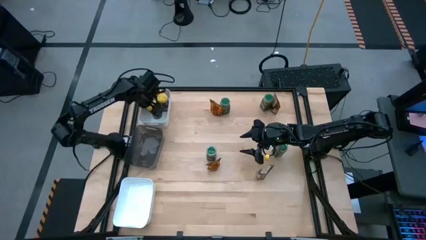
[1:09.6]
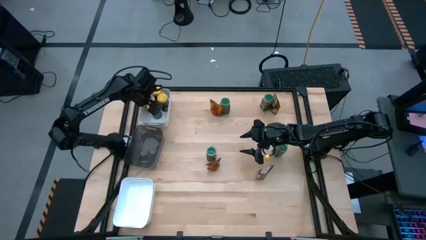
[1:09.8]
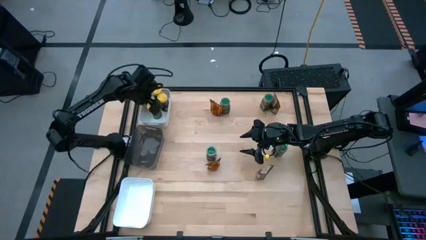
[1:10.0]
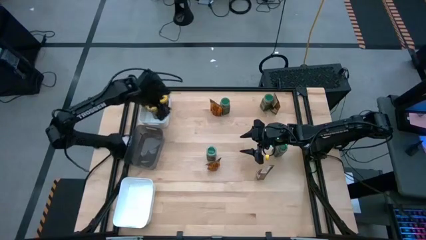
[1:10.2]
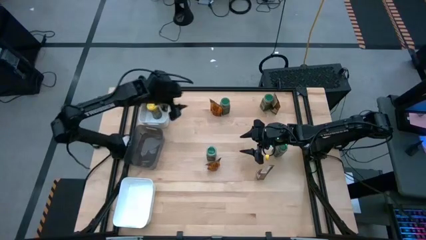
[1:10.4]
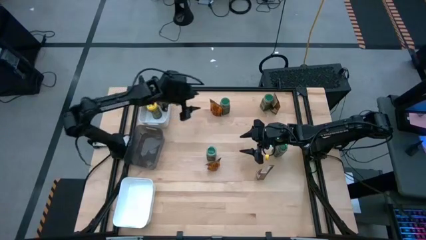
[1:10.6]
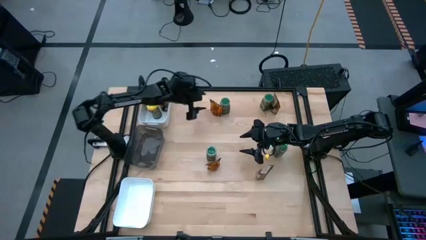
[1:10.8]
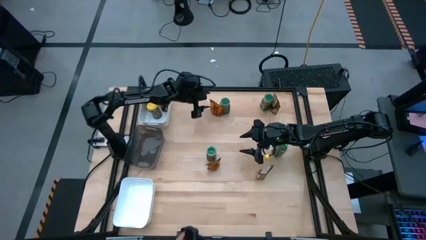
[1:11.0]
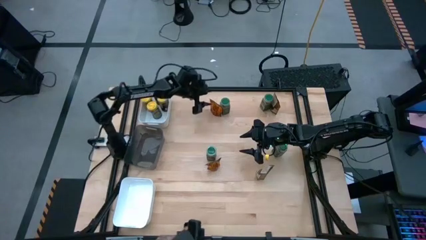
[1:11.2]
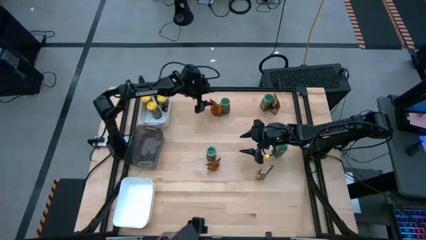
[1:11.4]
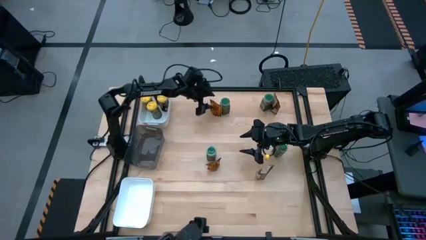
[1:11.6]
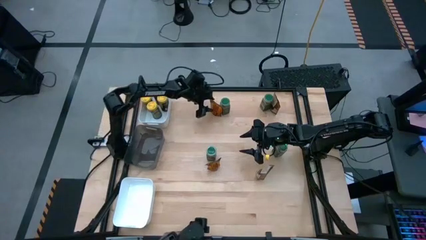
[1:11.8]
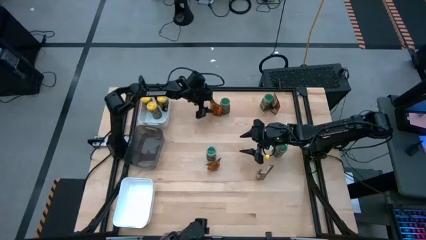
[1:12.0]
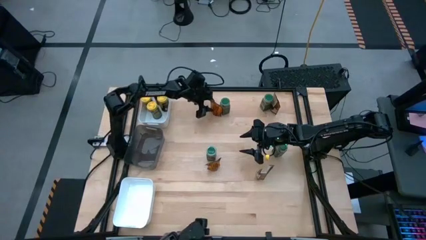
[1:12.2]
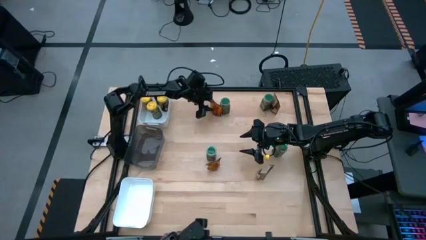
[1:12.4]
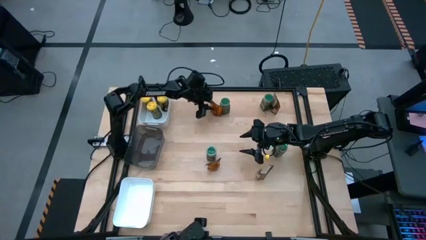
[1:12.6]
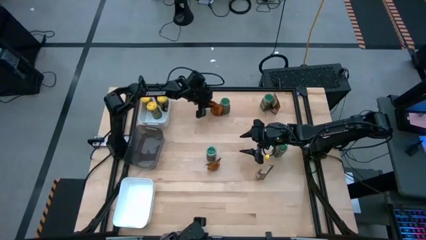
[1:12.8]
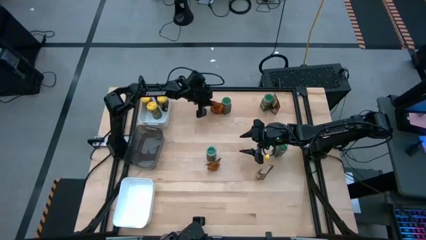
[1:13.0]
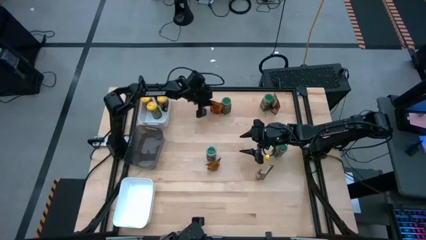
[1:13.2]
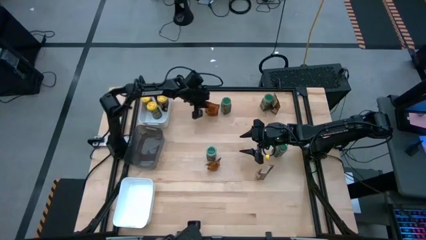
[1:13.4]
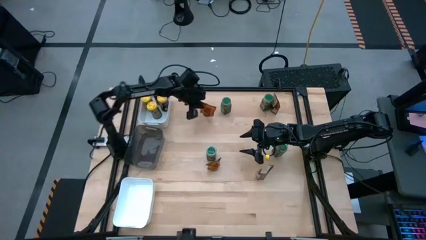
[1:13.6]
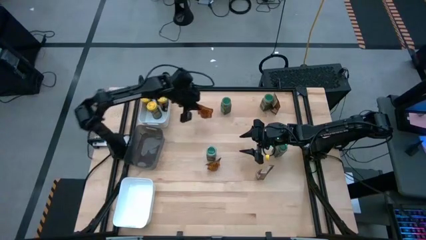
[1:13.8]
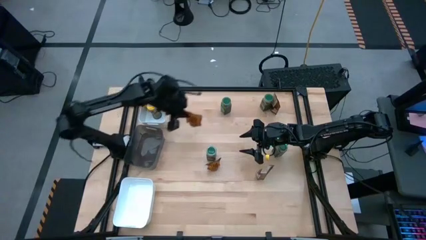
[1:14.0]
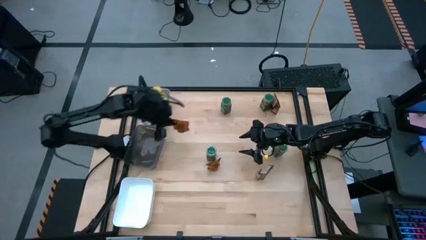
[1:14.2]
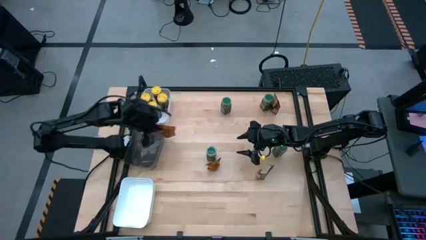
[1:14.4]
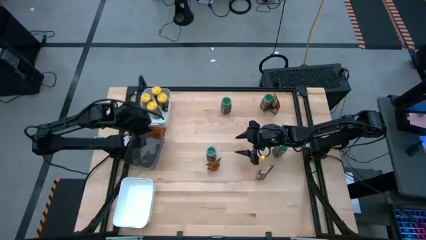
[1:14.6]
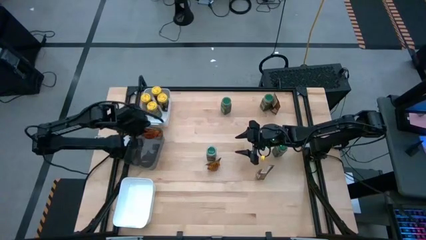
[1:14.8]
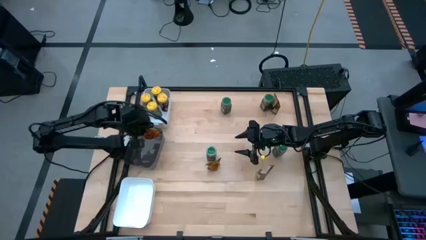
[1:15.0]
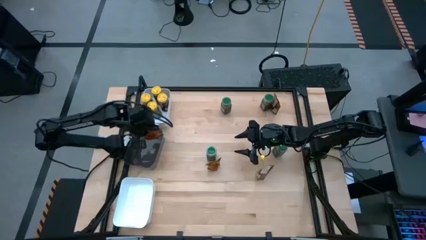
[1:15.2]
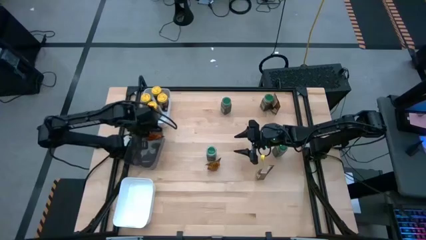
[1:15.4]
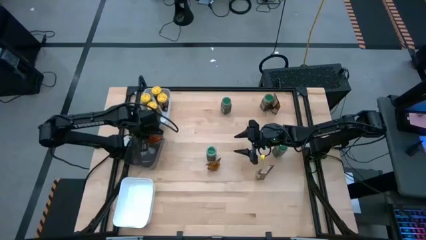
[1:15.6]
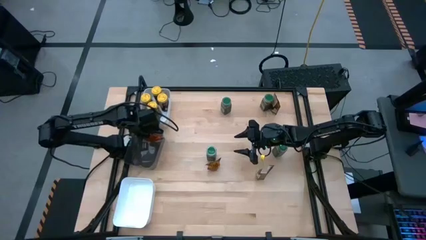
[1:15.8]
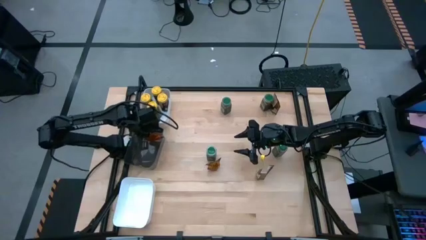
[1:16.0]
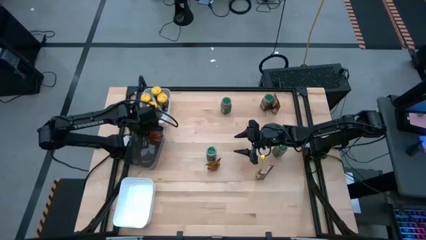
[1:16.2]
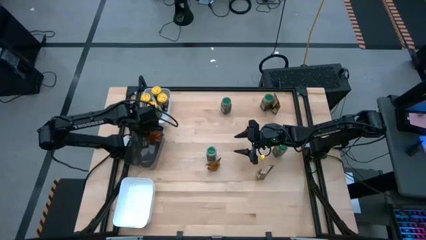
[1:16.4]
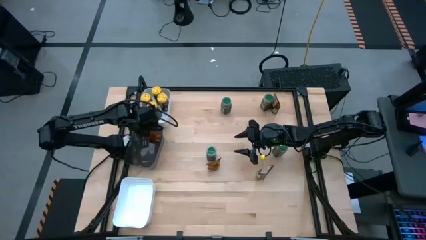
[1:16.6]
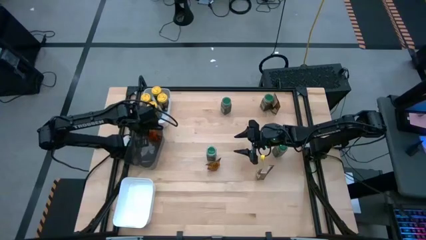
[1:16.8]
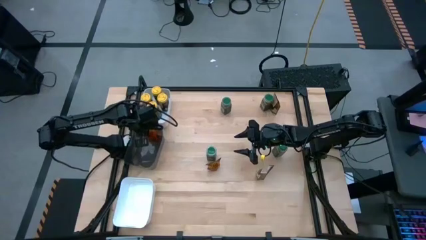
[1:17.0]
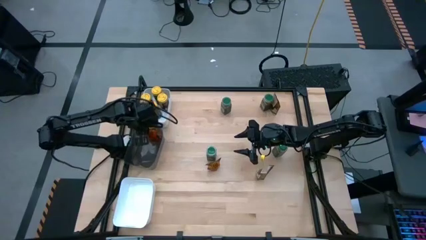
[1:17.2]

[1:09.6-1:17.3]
Task: Sort spices by type
Put the top left orange seasoning pack into the black bin

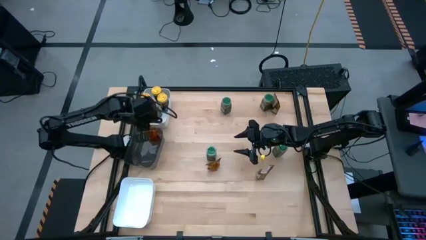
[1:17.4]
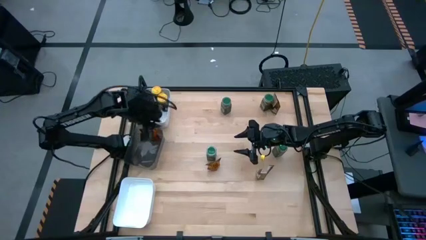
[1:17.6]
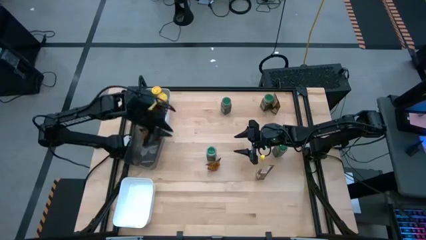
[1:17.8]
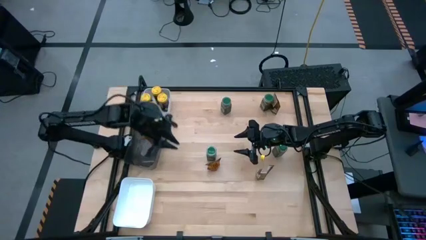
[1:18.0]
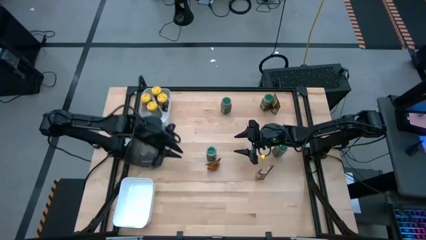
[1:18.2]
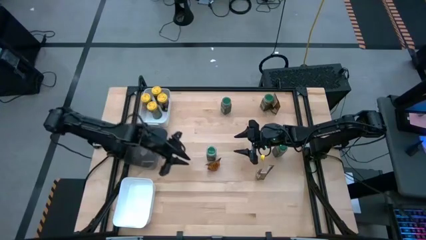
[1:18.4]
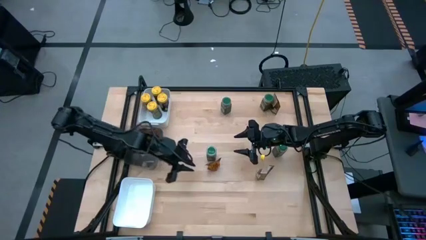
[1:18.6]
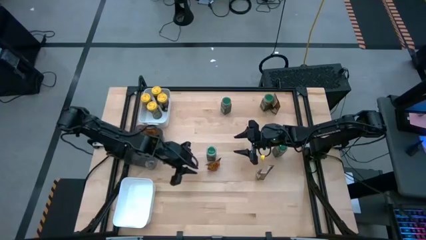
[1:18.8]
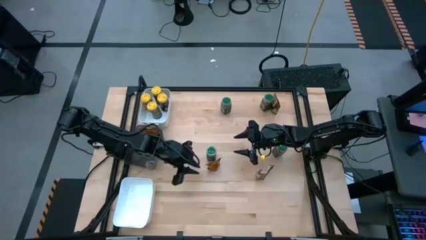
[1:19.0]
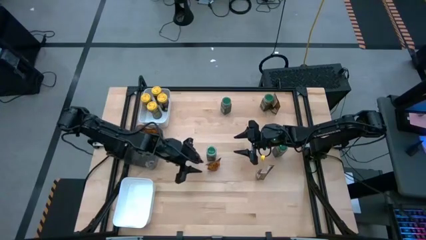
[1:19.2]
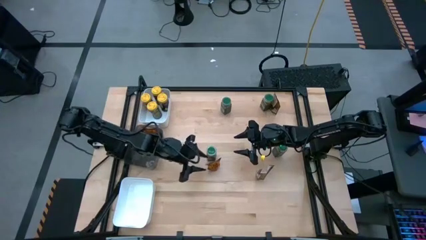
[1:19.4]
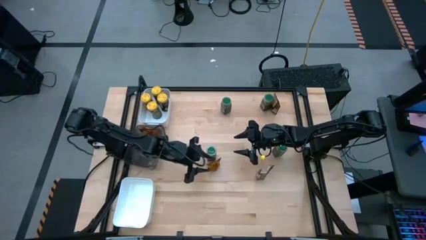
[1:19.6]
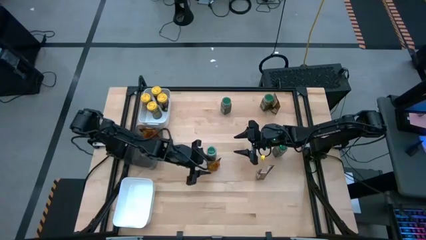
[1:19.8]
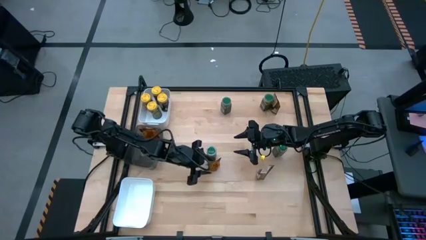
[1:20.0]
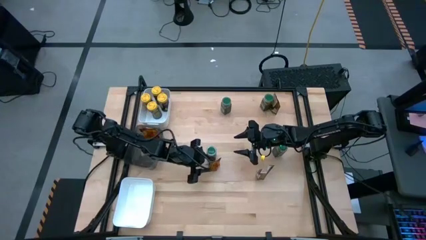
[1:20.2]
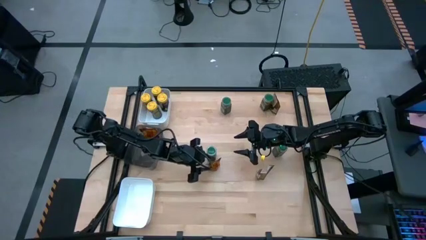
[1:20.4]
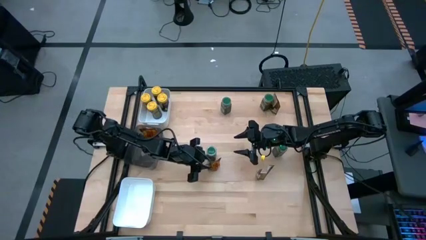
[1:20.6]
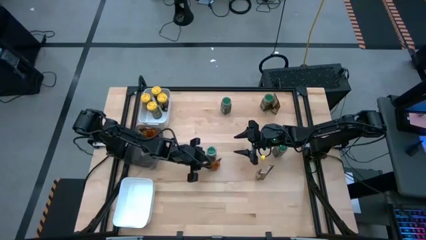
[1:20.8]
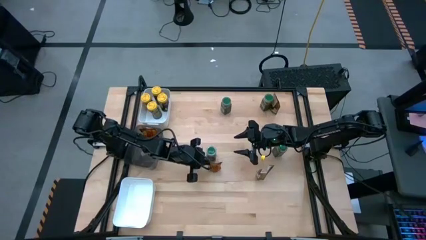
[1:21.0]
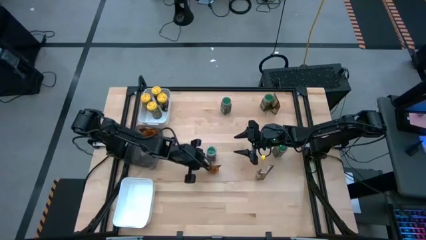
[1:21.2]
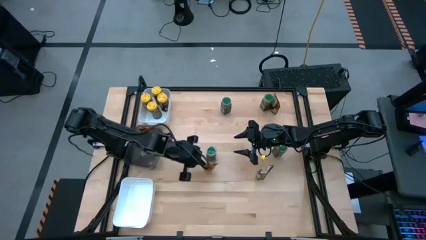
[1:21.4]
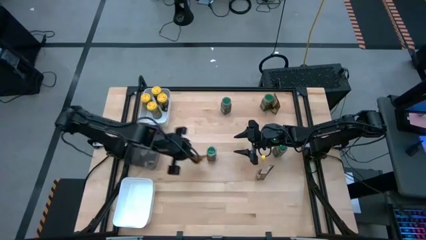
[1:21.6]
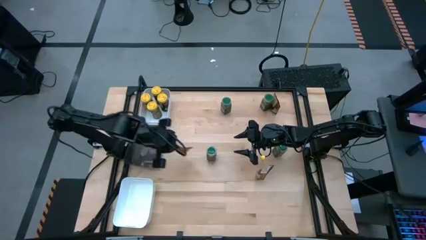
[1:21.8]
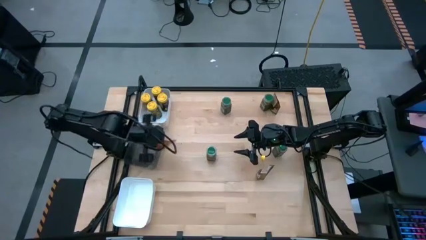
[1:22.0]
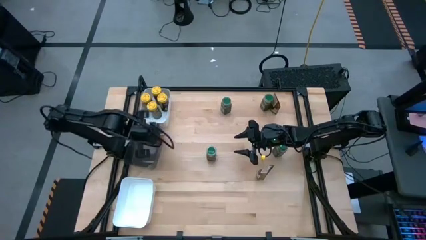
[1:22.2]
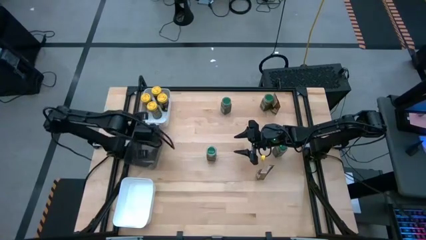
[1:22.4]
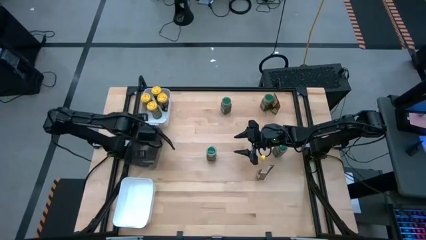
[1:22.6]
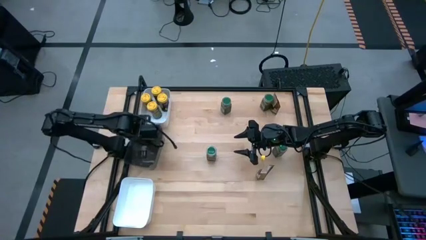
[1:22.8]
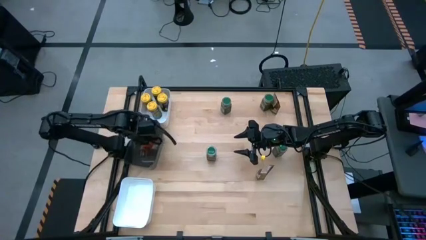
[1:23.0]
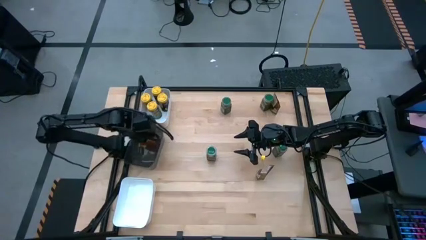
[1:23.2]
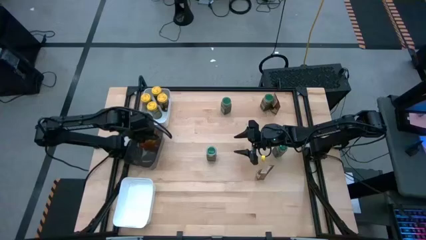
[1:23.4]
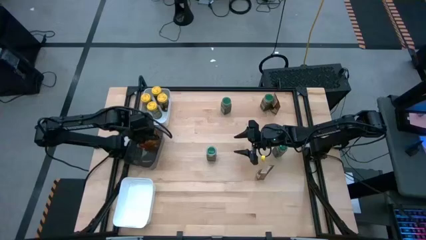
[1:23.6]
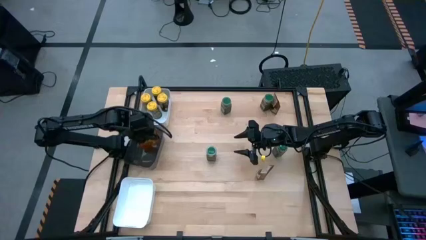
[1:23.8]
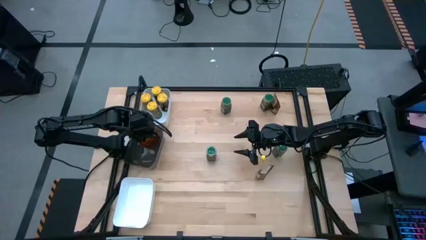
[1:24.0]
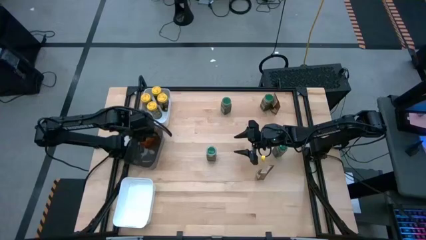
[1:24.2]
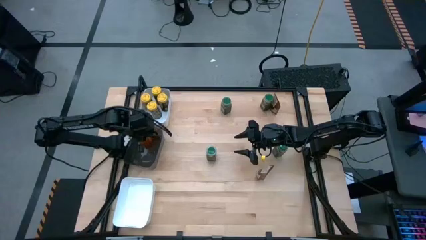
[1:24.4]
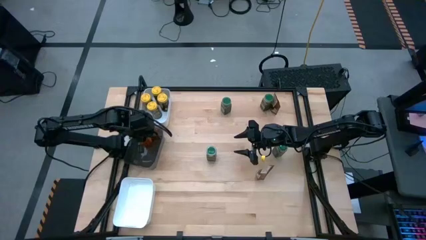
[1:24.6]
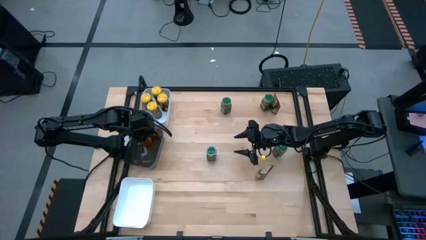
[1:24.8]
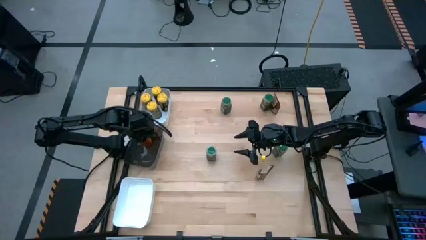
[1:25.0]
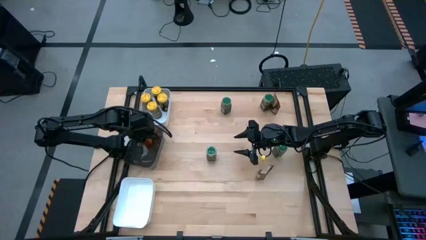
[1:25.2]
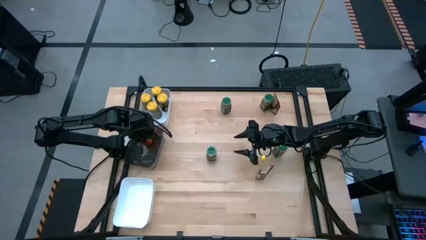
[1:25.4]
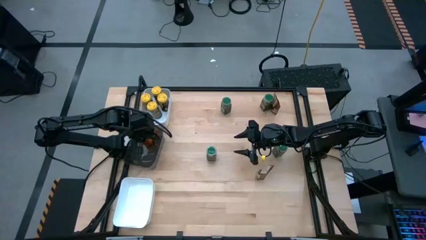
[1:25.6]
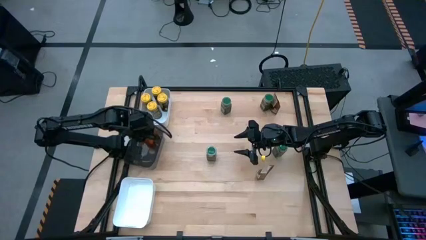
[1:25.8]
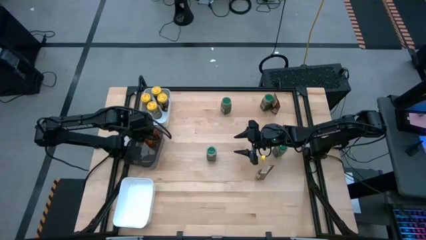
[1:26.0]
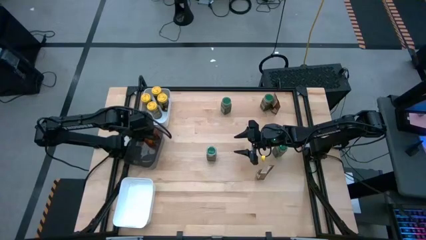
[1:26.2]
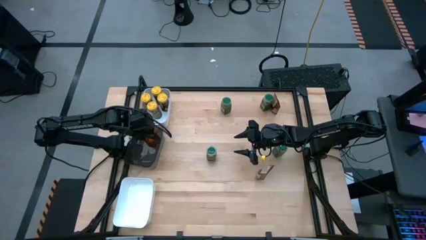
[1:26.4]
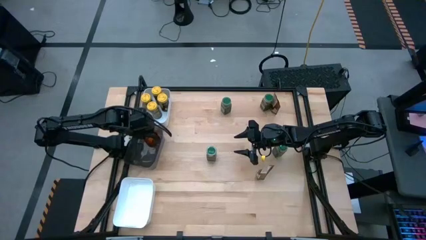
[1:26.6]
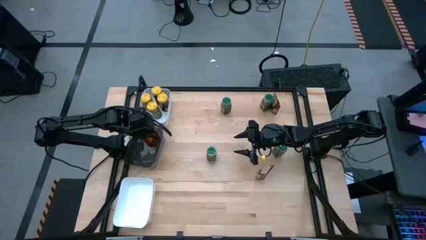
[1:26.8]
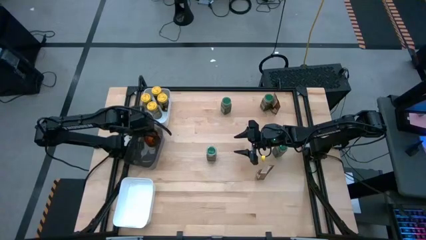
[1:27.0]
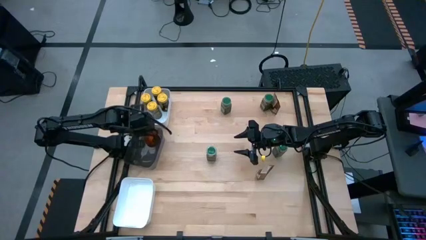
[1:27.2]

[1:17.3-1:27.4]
Put the bottom left orange seasoning pack into the black bin
